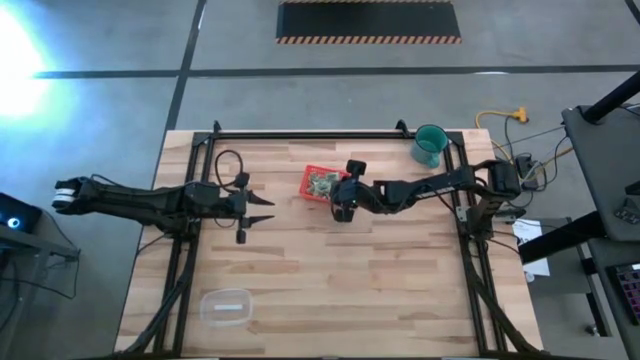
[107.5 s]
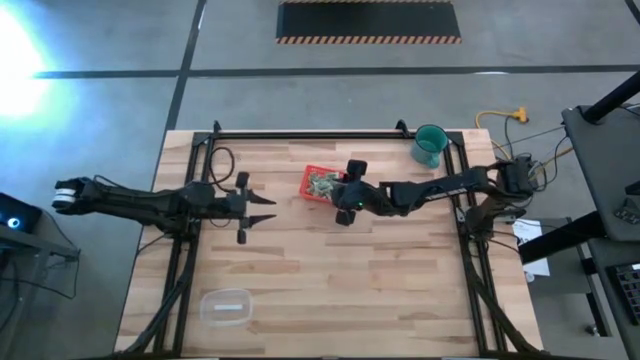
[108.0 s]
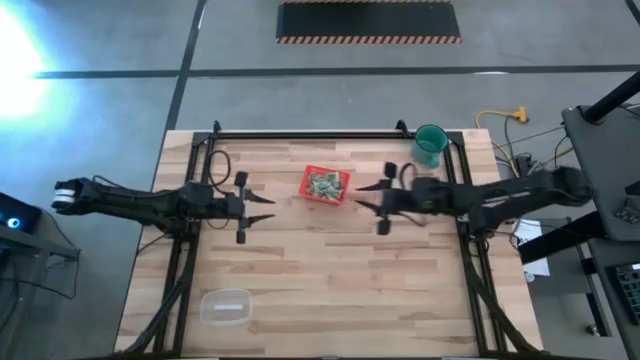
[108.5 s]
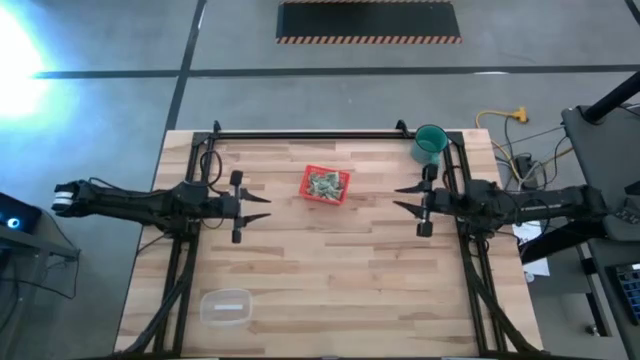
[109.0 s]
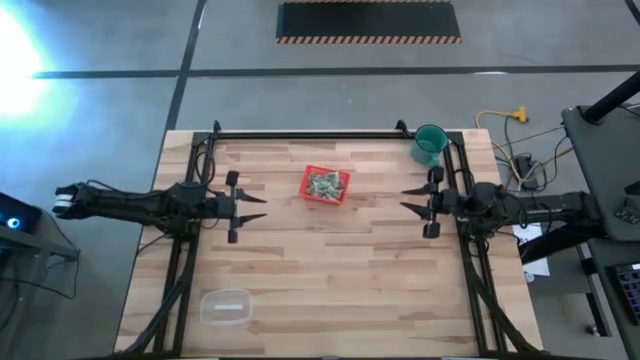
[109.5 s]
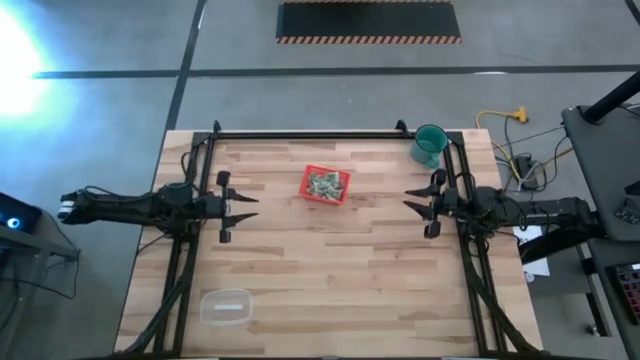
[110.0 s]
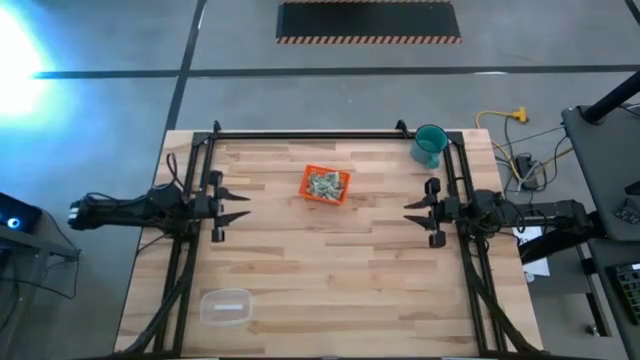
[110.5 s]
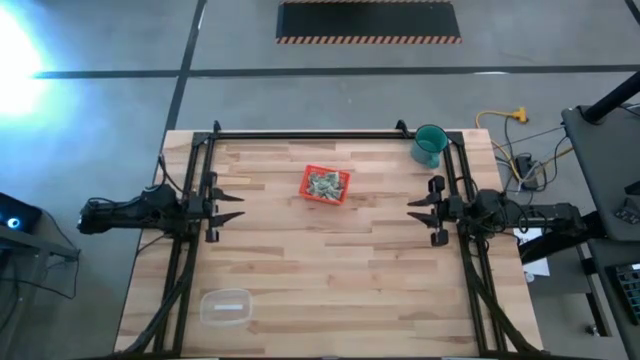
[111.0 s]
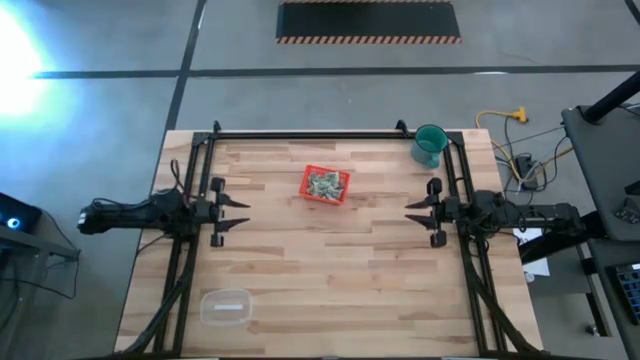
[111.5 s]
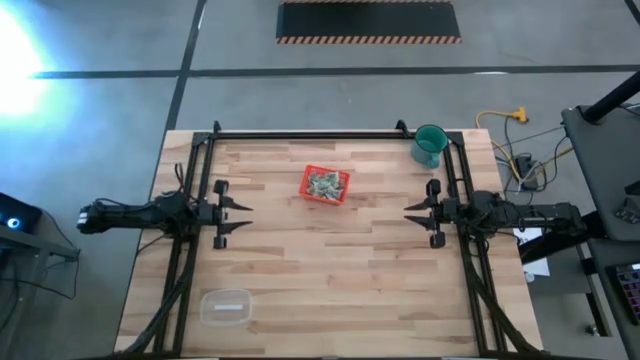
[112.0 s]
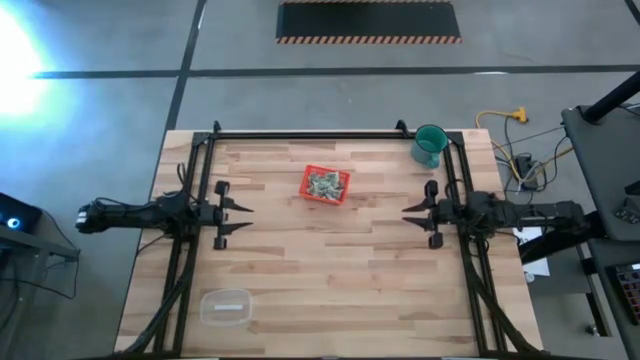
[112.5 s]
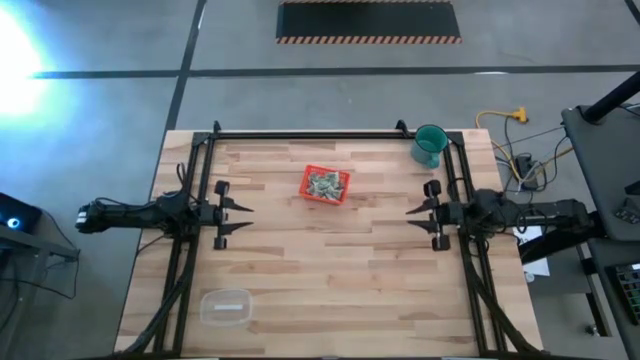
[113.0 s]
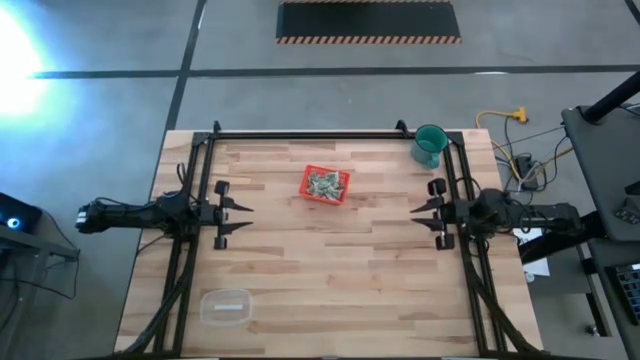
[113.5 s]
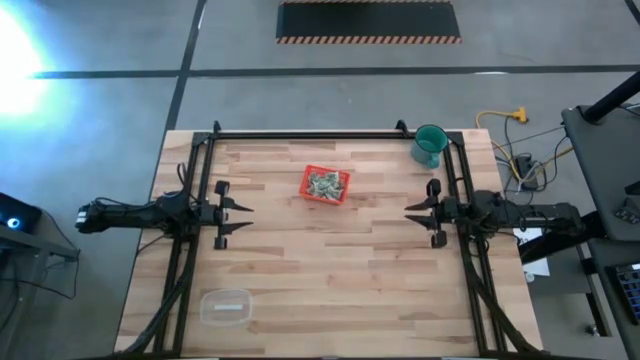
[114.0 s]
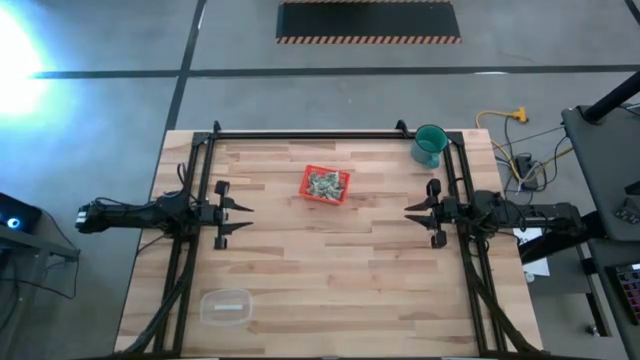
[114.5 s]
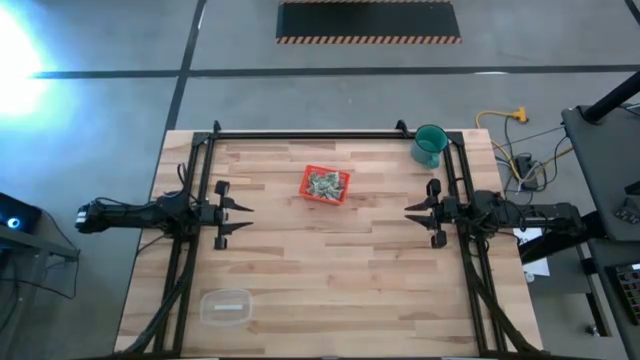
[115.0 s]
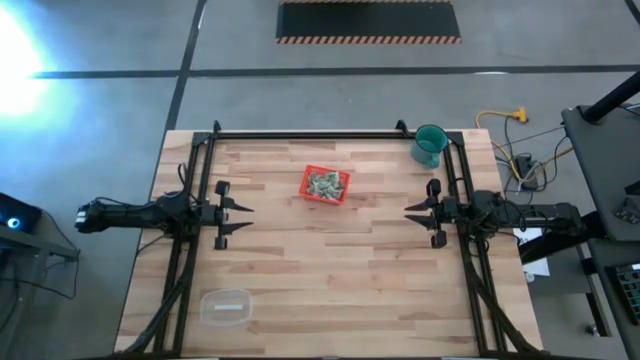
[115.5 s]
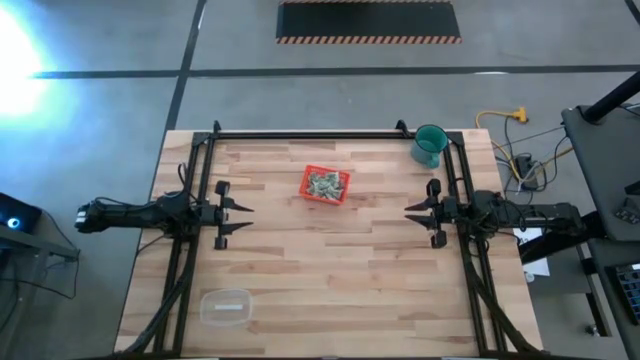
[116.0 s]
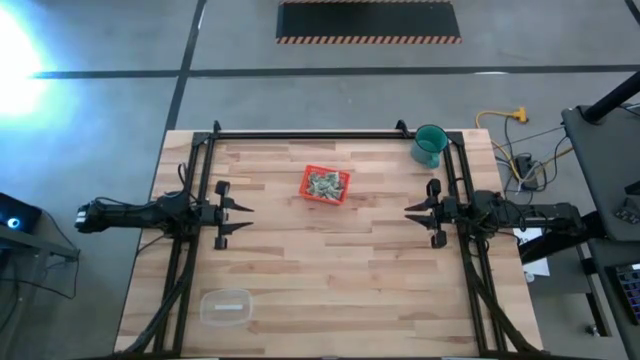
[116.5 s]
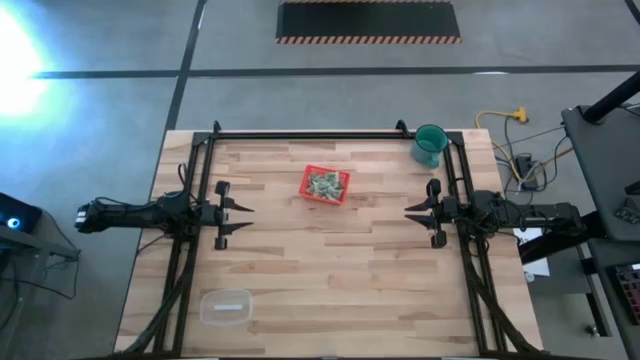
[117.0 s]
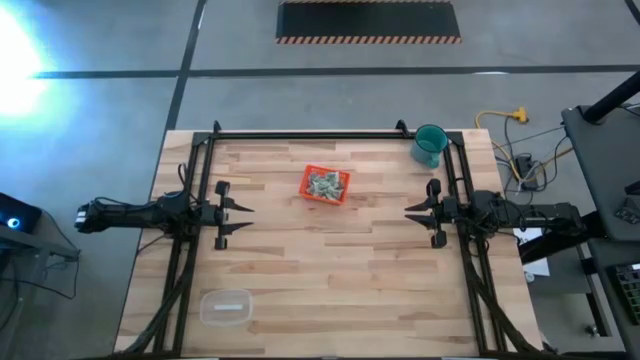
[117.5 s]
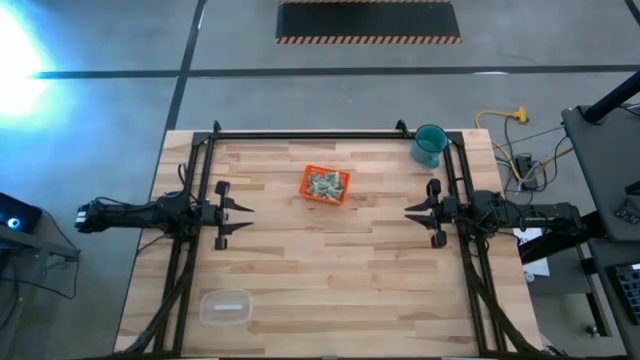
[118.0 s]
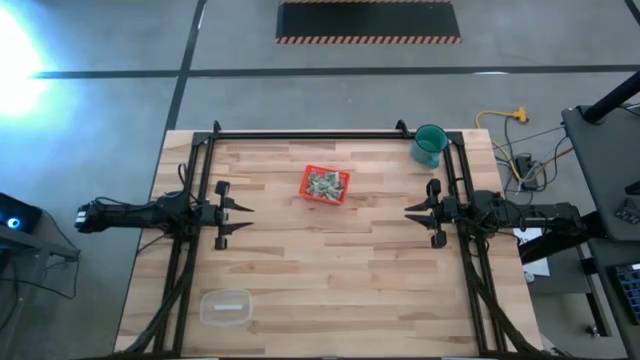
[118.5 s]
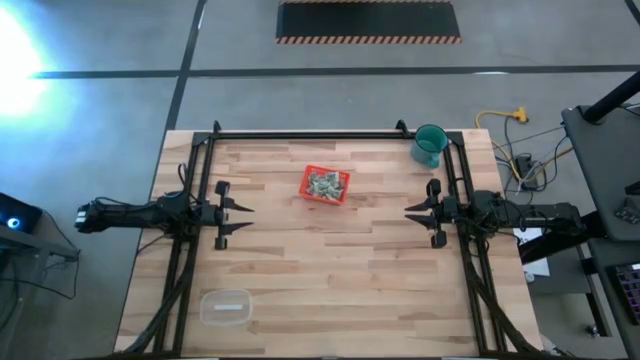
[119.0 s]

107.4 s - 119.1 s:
Task: Pick and place items into bin
Return to Home Position

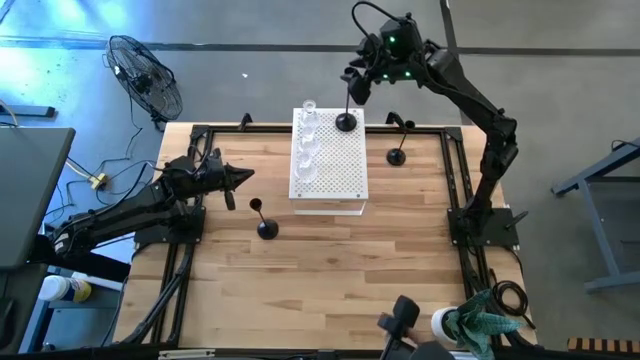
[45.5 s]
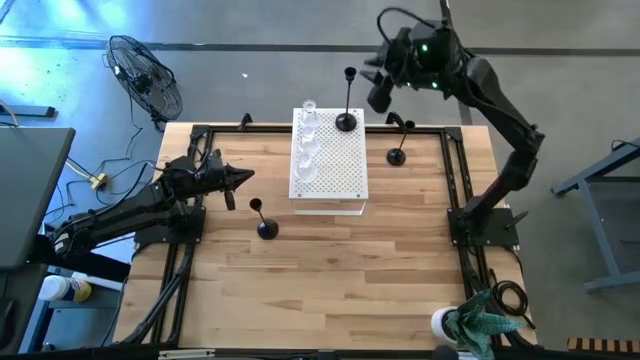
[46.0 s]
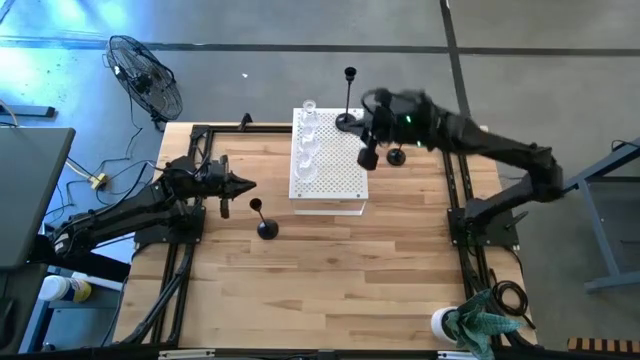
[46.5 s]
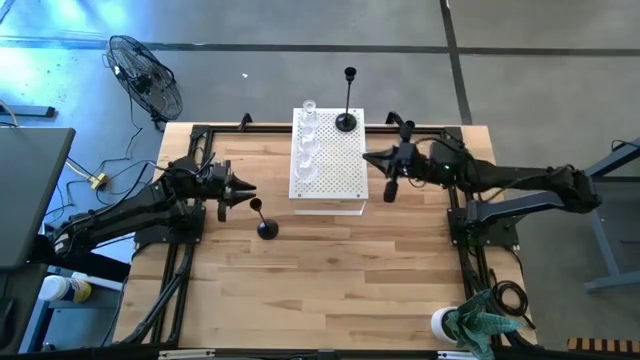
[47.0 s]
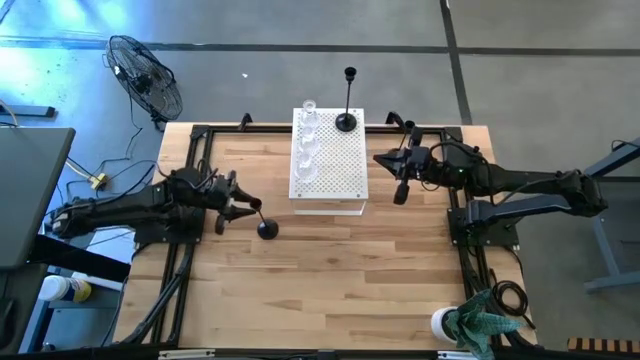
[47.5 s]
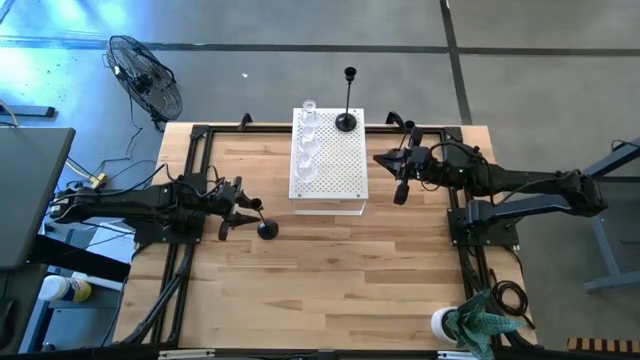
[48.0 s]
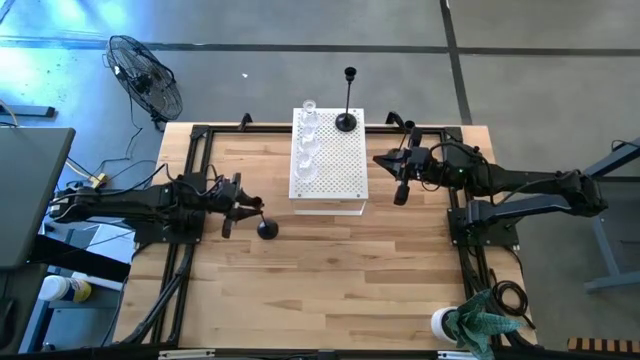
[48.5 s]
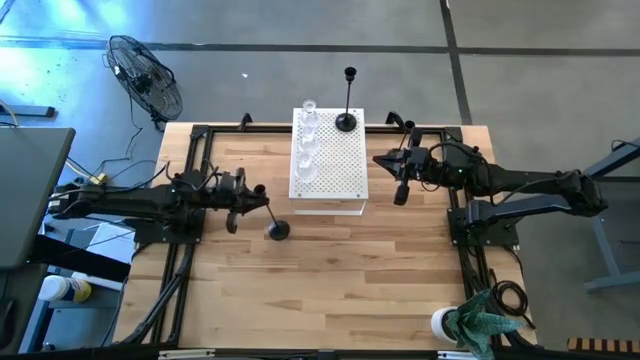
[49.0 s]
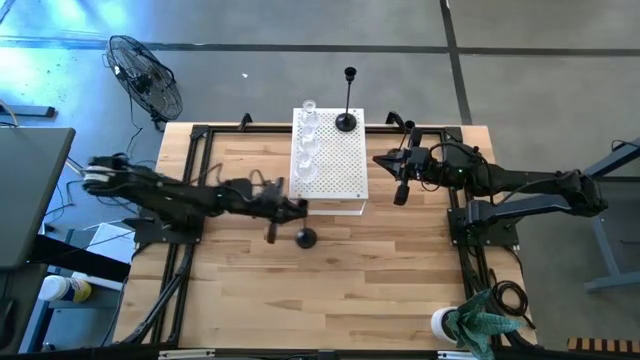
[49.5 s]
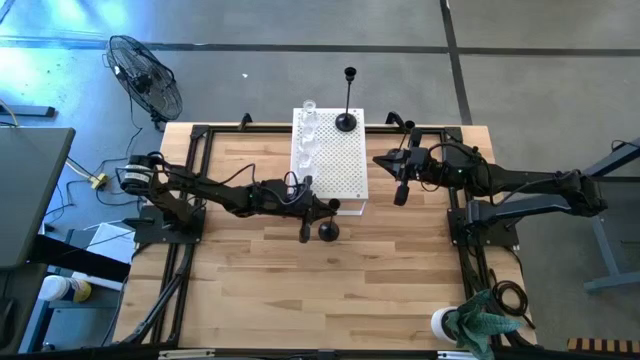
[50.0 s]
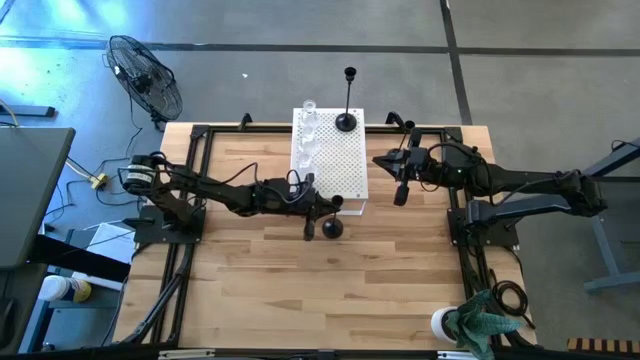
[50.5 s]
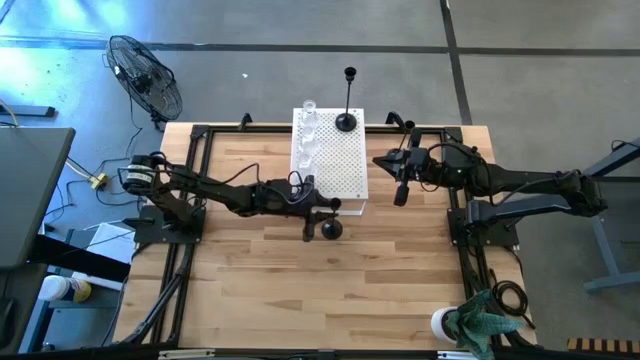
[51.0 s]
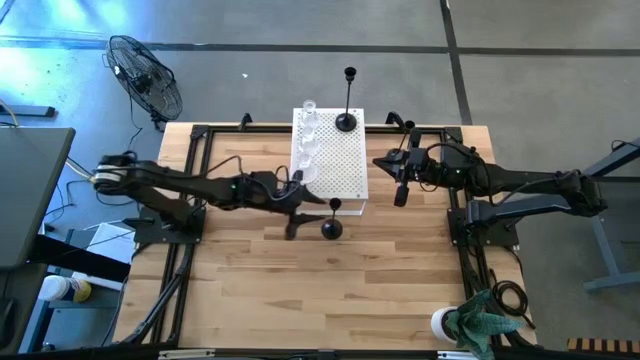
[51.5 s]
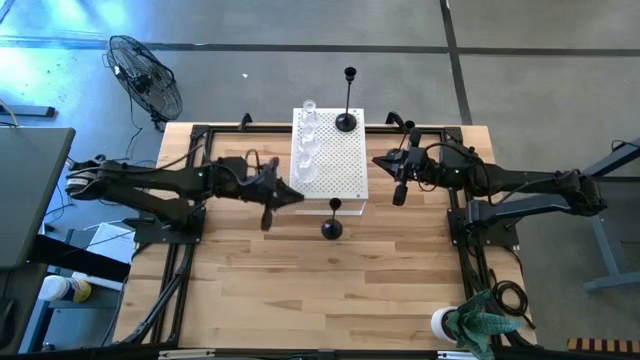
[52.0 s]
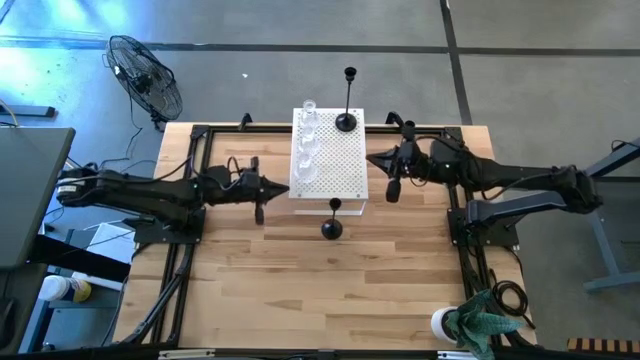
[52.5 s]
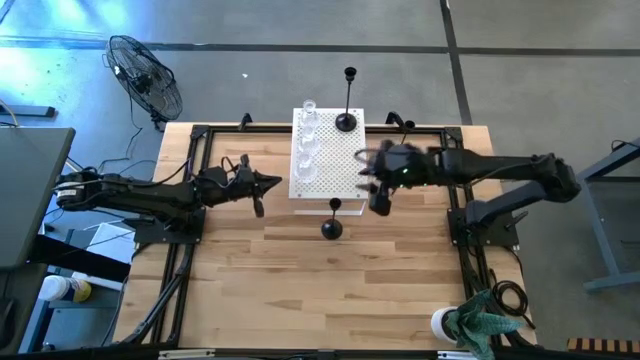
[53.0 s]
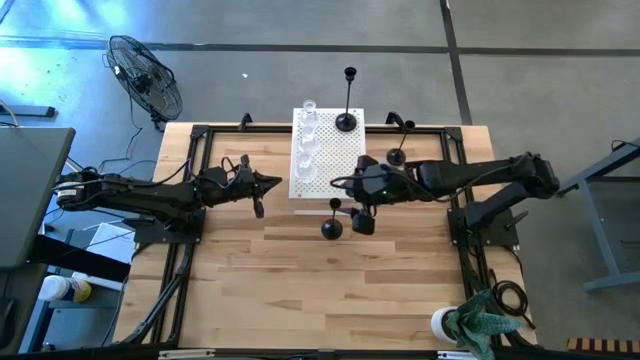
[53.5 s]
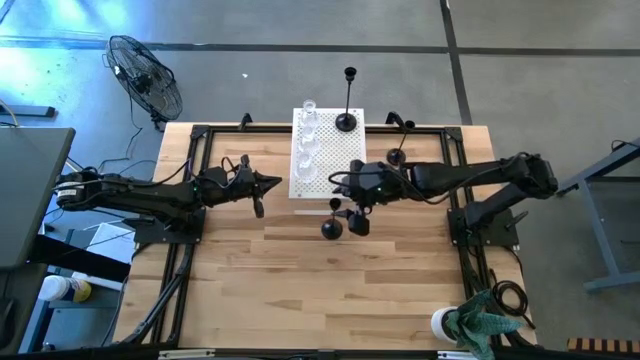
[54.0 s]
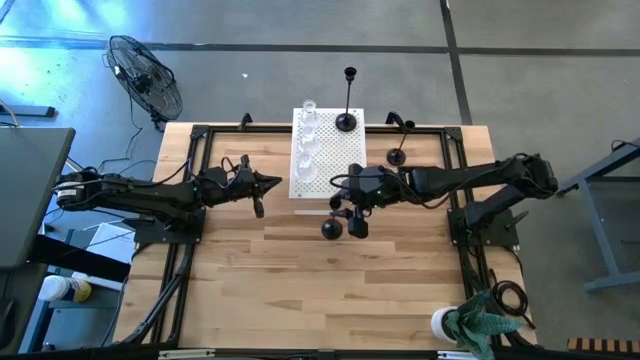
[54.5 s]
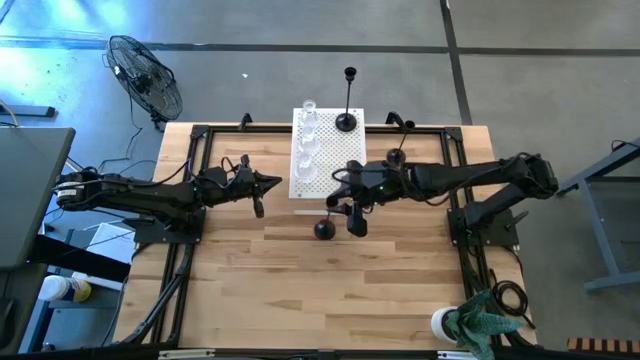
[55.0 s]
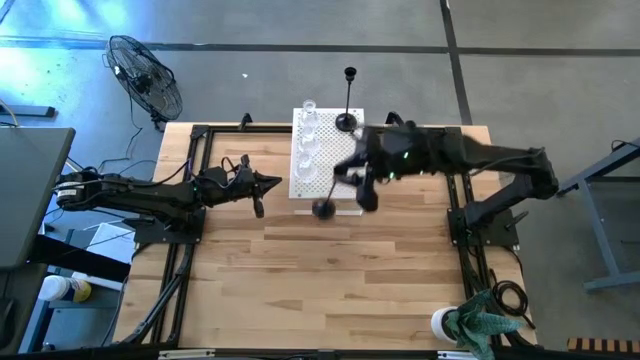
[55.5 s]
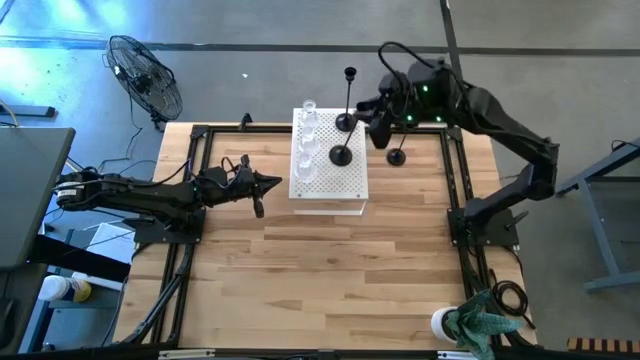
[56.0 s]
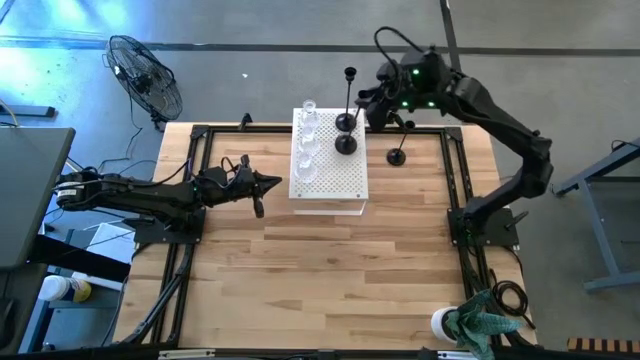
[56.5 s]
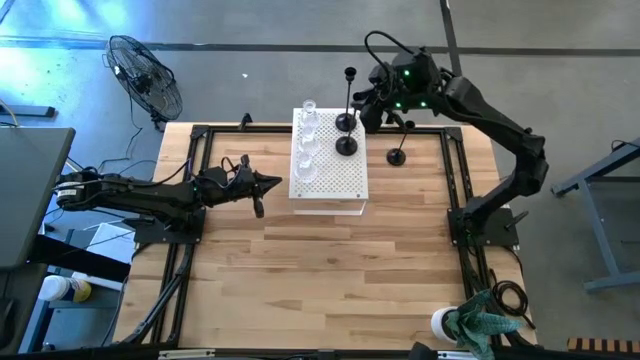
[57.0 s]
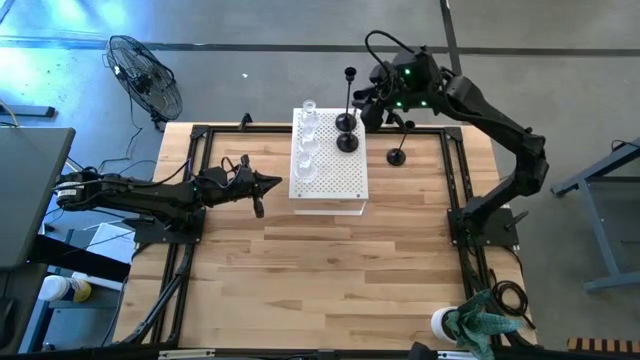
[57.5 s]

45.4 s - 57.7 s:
Task: Pick & Place candle stick holders
Put the bottom black candle holder on the shelf aligned with the other black candle holder
